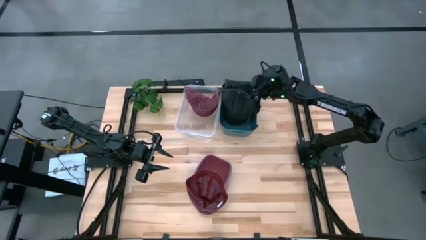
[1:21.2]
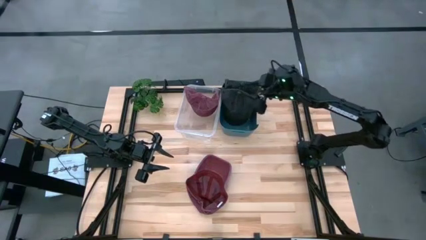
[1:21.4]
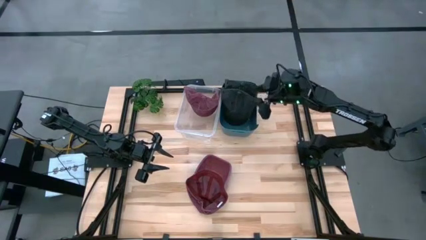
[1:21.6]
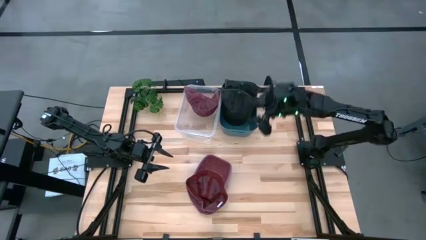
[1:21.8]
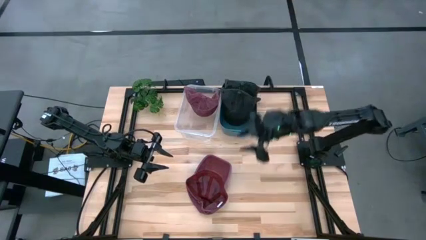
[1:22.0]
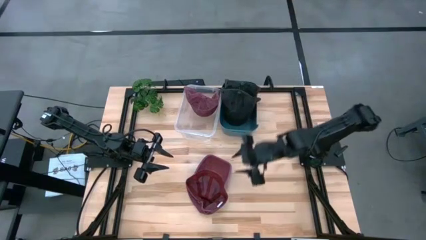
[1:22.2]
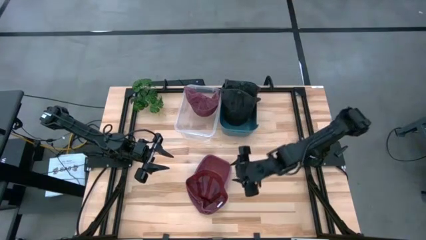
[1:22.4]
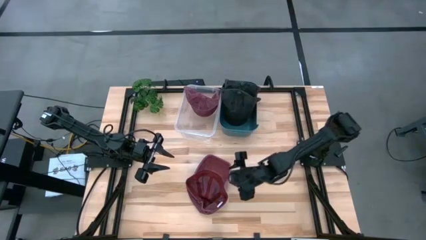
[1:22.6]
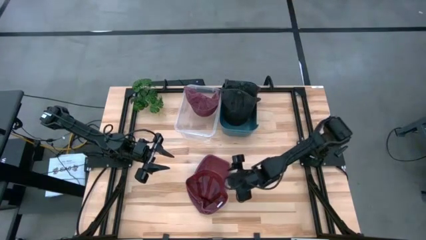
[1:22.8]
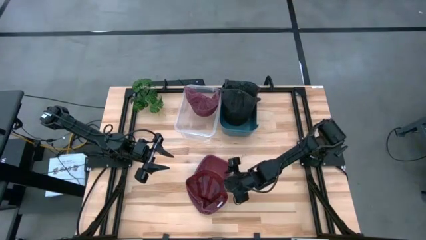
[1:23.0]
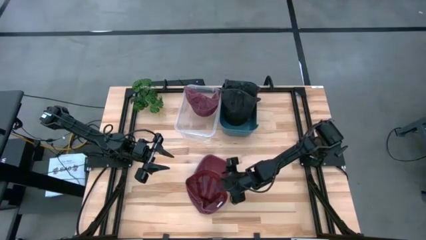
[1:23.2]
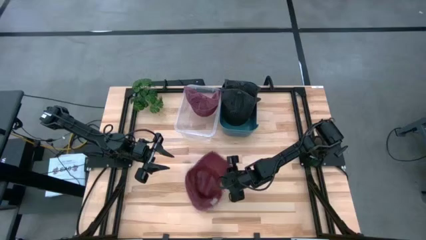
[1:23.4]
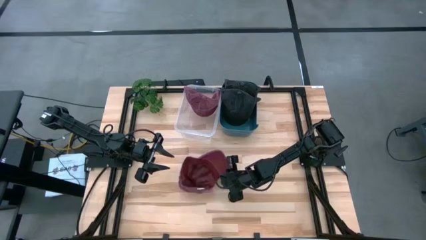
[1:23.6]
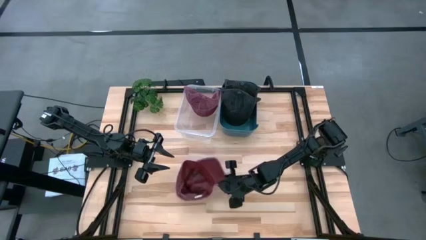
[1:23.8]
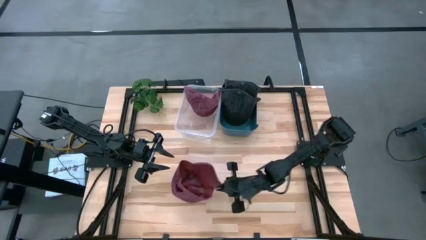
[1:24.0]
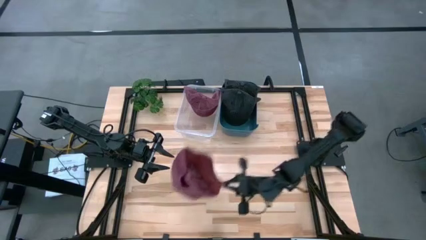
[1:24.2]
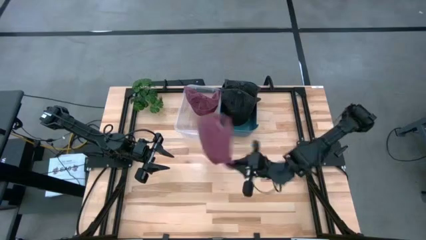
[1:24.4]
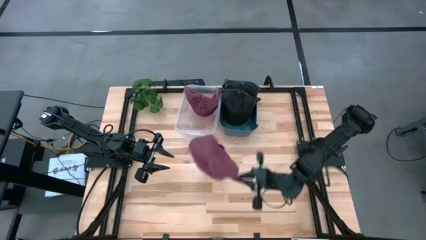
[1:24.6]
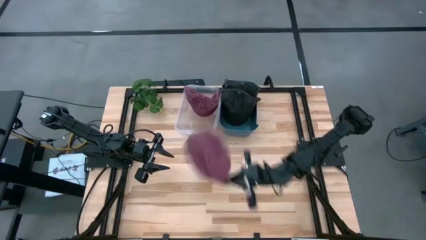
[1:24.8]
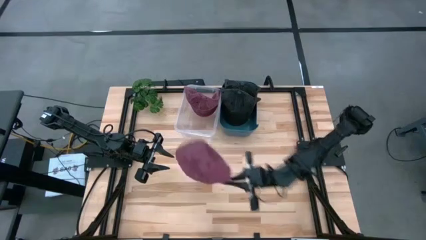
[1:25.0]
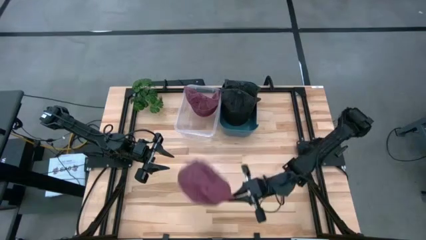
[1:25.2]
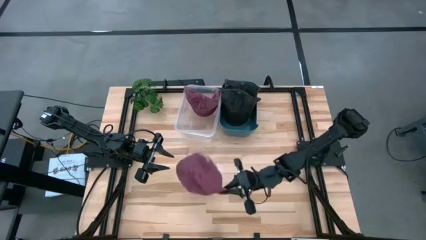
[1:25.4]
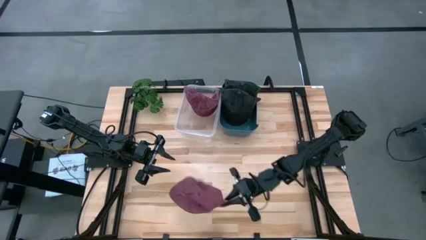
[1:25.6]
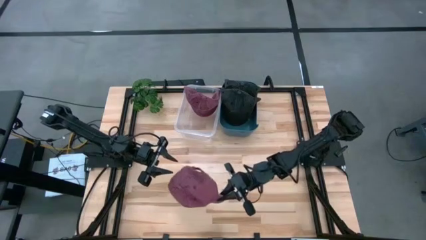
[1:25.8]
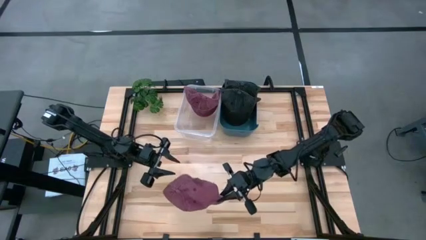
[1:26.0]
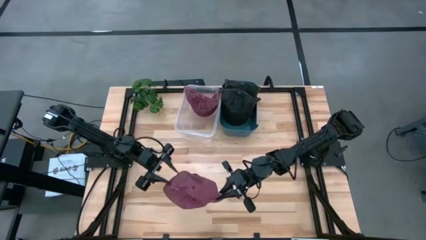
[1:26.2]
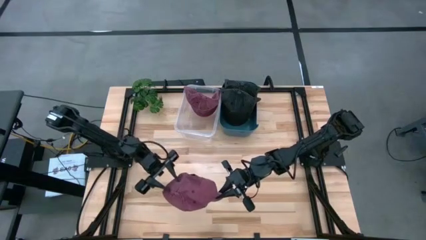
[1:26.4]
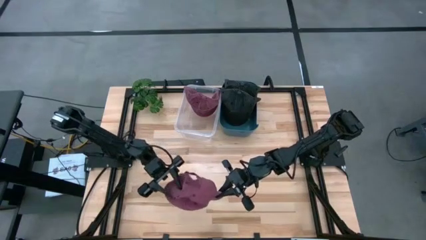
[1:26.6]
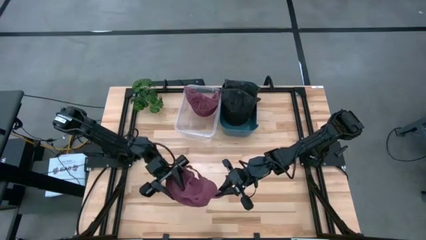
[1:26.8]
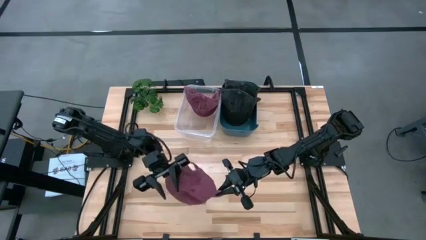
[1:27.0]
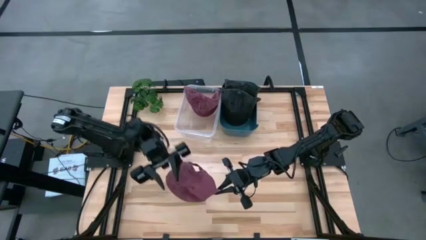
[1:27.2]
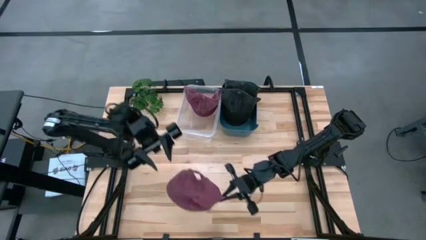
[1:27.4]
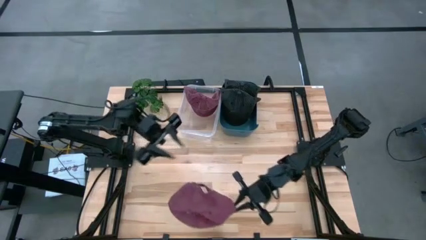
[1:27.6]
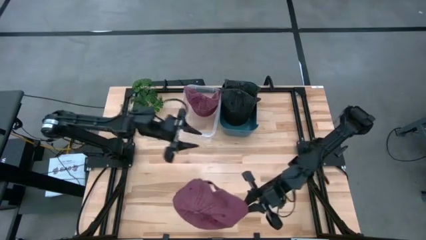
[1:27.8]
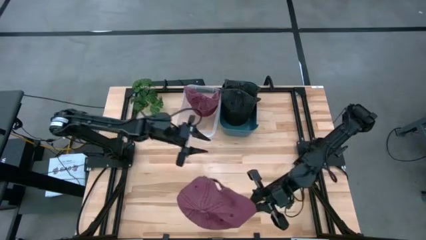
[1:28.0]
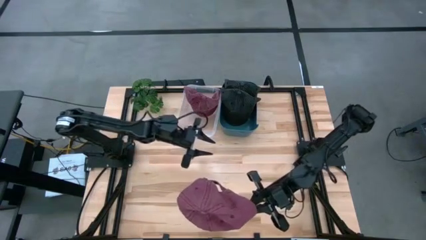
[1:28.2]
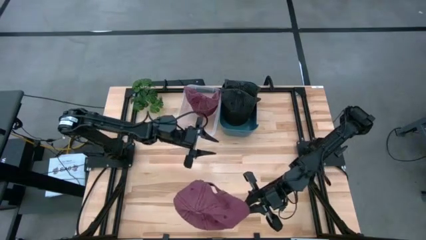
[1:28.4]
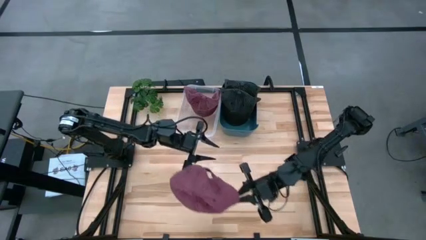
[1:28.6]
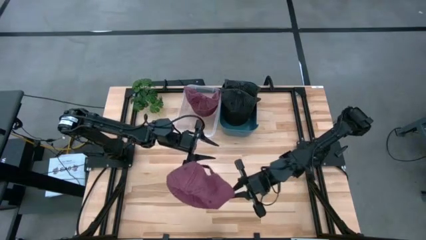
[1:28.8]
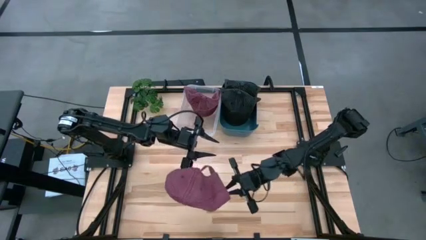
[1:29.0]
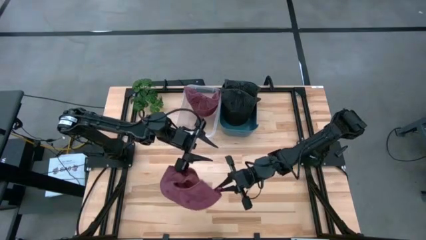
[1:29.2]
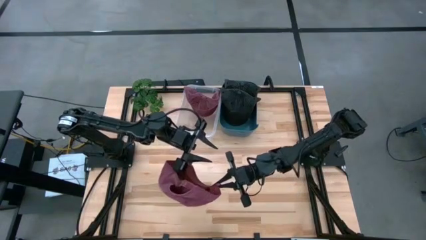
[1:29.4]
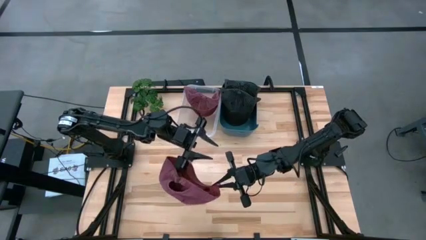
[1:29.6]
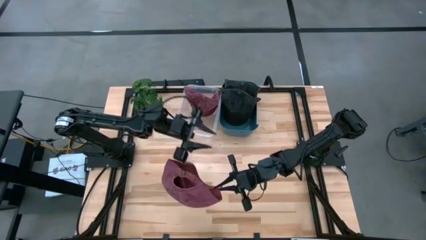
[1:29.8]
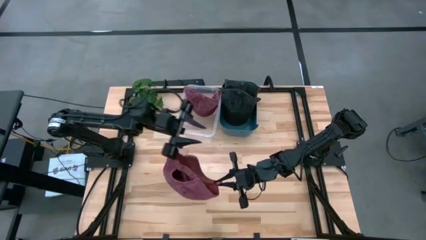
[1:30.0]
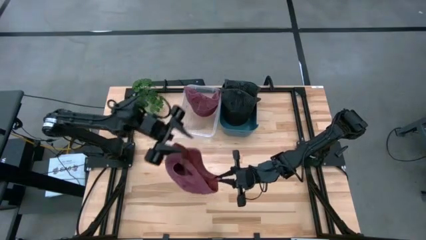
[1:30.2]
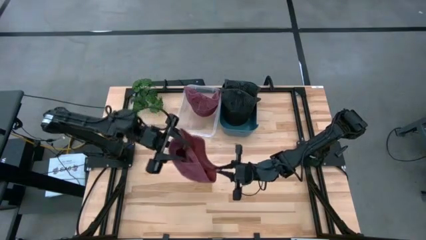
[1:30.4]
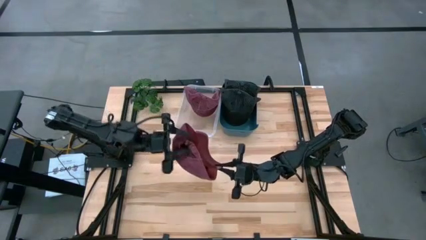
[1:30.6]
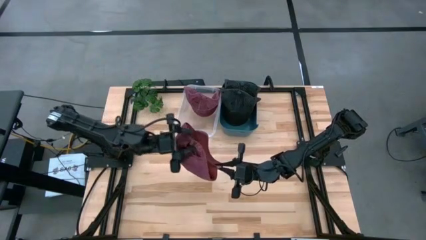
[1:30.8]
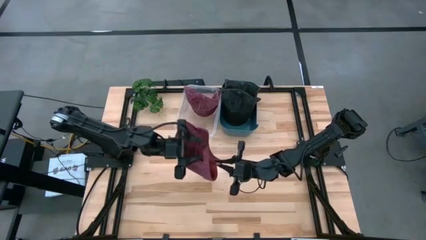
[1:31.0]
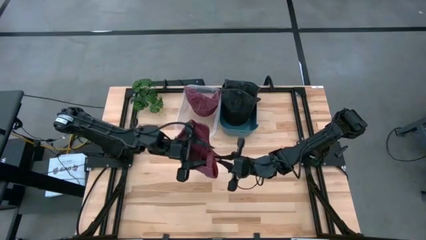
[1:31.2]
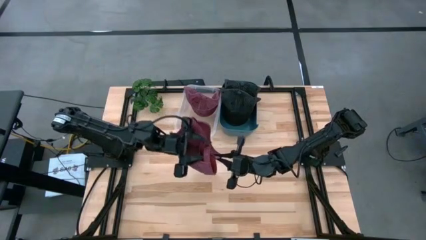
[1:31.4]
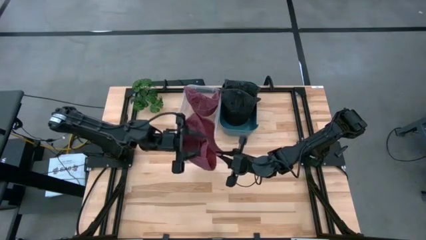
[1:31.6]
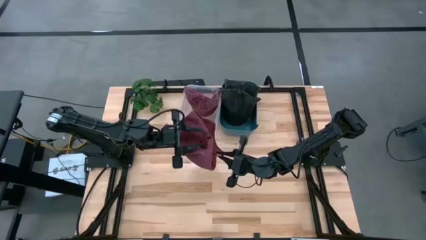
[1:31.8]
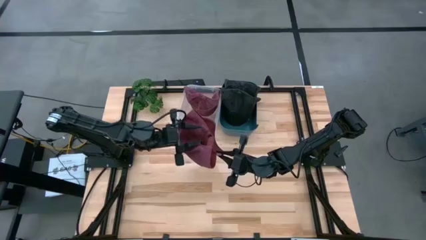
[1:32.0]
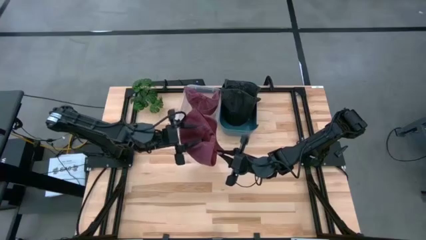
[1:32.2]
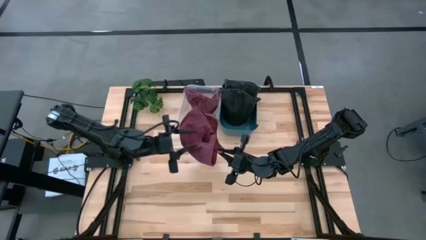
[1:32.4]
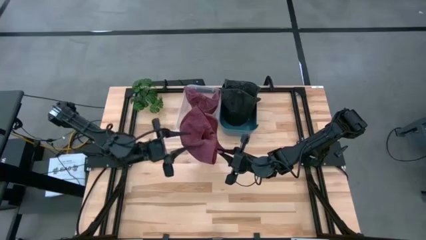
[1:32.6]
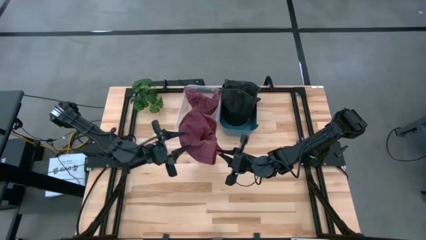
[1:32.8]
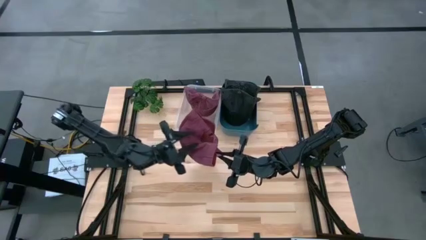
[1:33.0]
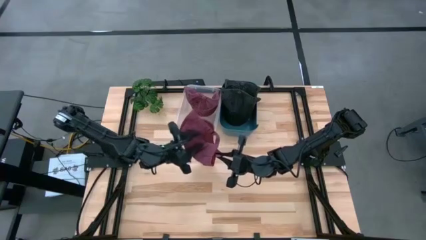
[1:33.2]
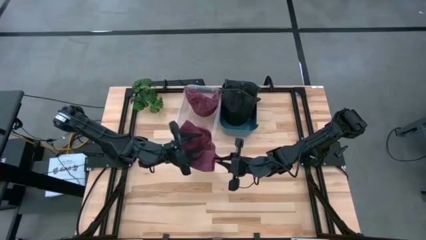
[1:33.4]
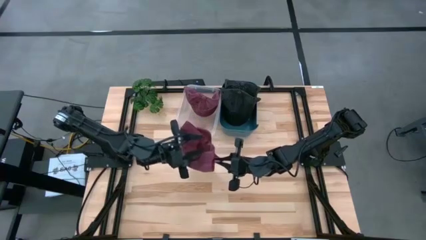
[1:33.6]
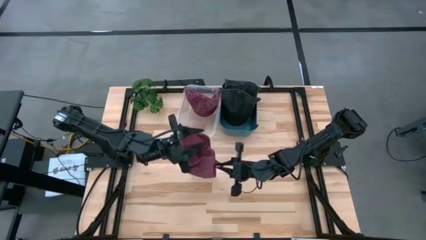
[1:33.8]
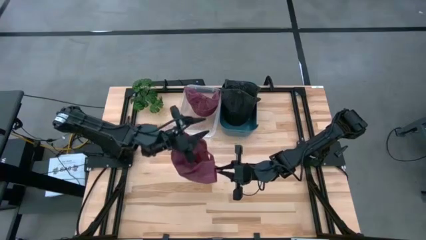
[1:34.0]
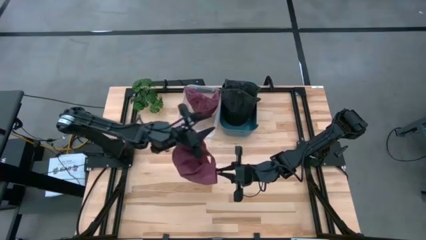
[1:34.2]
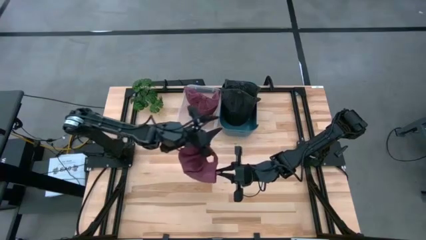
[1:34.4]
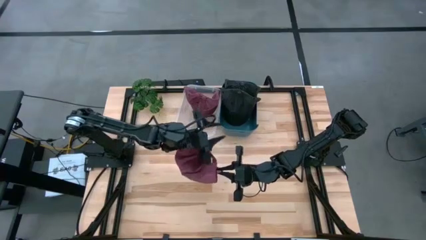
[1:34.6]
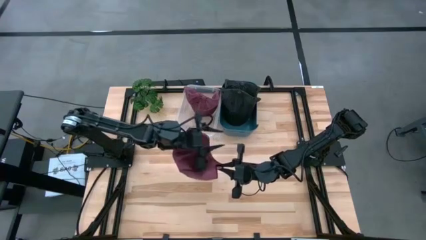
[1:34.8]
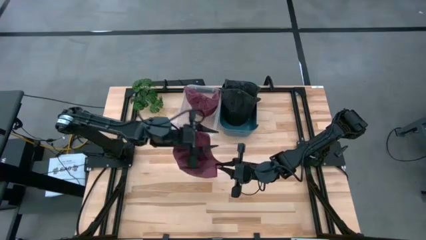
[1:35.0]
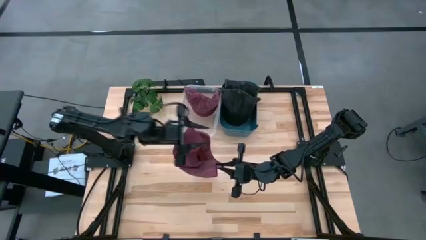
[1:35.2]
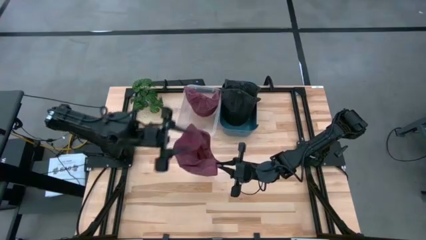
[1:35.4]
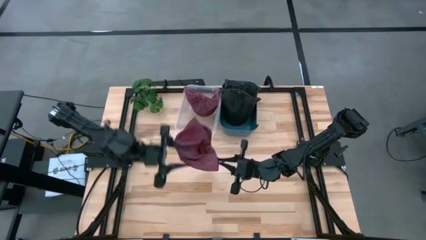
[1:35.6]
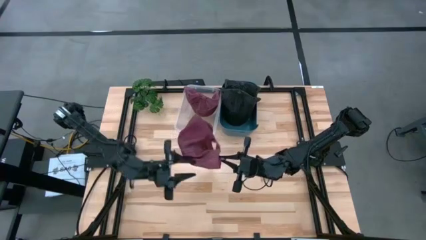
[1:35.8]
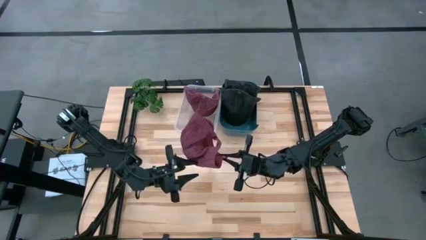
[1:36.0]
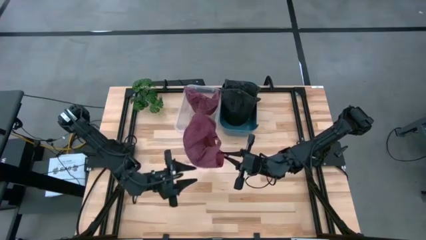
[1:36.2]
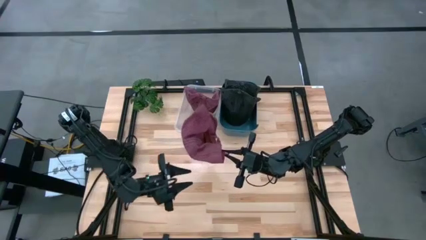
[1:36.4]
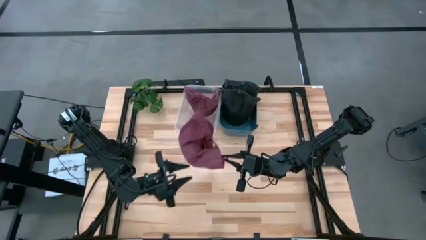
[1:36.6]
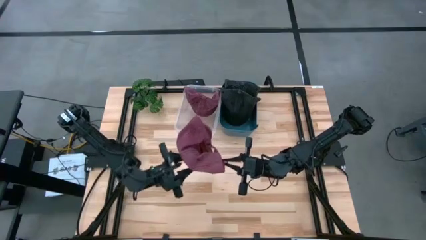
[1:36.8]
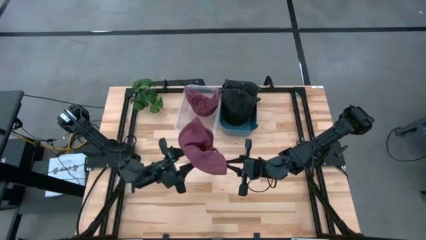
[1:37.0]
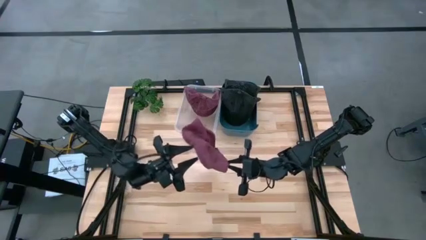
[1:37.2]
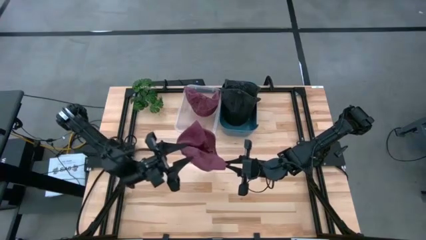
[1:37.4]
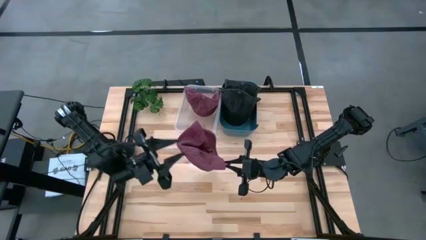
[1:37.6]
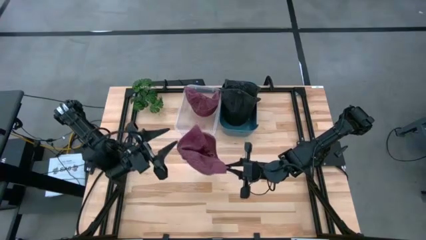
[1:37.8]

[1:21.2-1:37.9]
Task: Pick & Place hat
Put the red cap into the transparent bin
